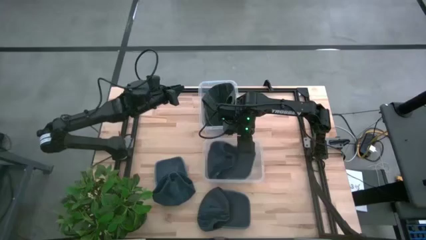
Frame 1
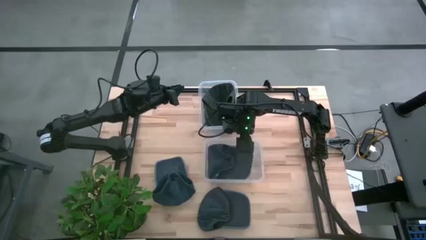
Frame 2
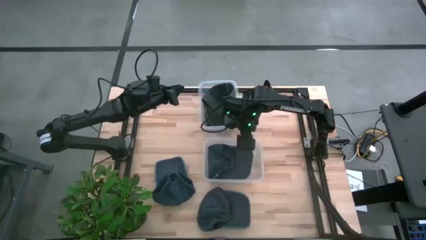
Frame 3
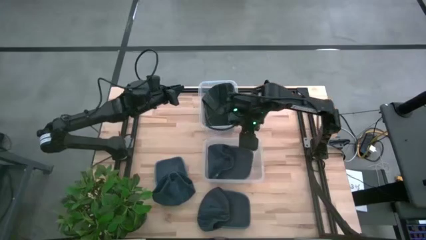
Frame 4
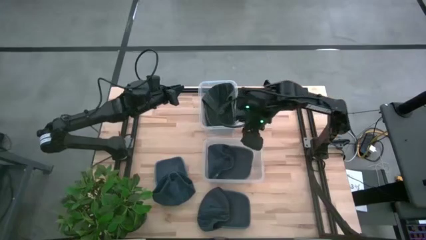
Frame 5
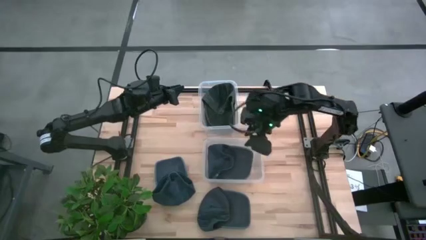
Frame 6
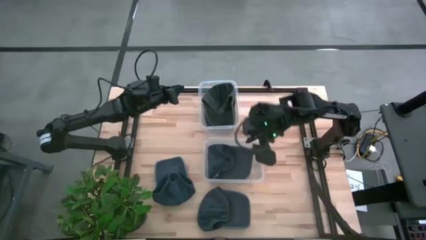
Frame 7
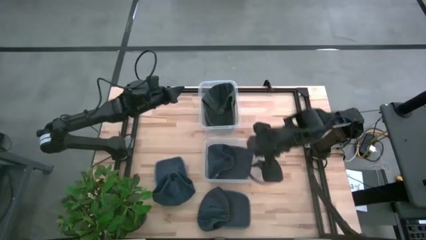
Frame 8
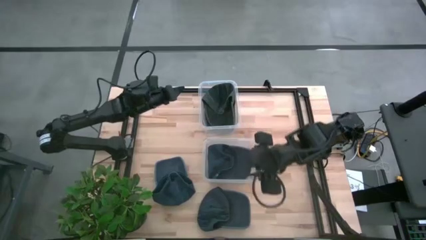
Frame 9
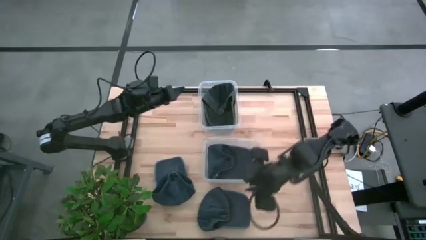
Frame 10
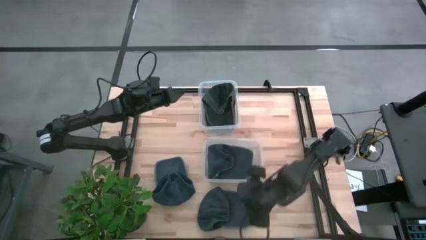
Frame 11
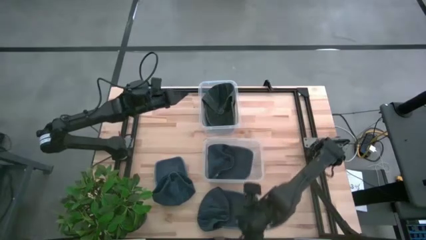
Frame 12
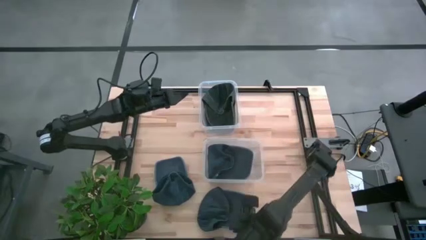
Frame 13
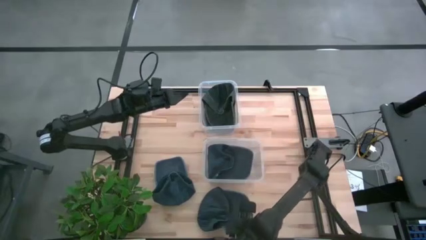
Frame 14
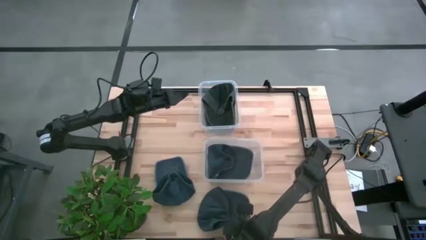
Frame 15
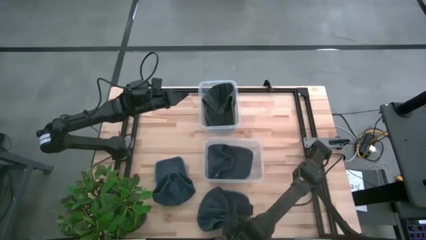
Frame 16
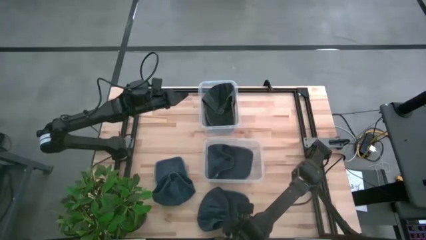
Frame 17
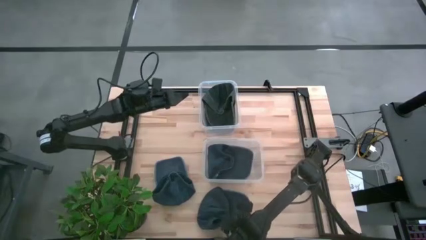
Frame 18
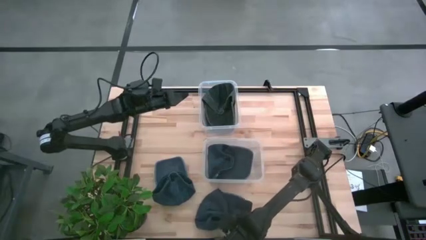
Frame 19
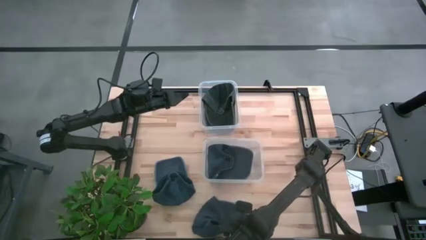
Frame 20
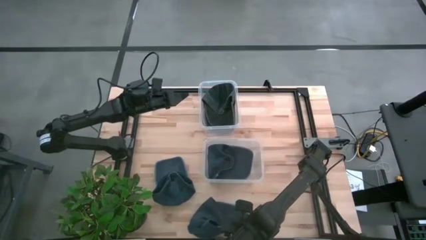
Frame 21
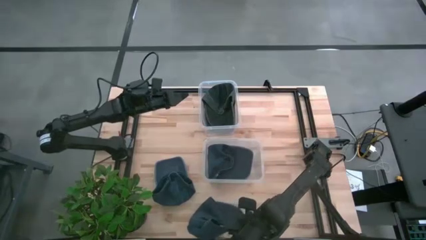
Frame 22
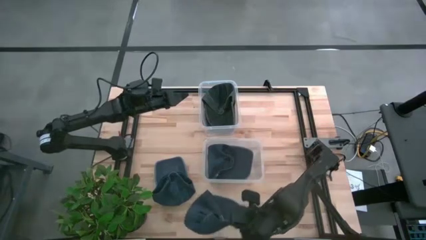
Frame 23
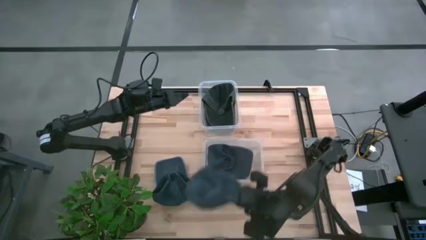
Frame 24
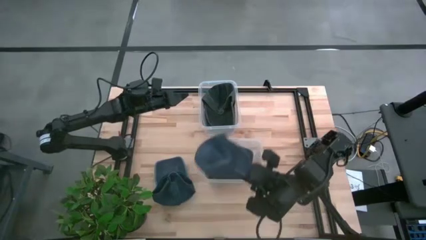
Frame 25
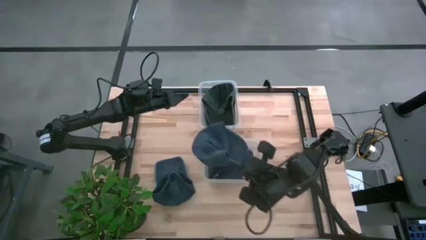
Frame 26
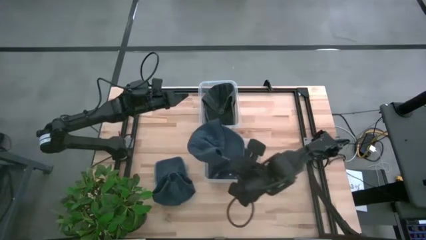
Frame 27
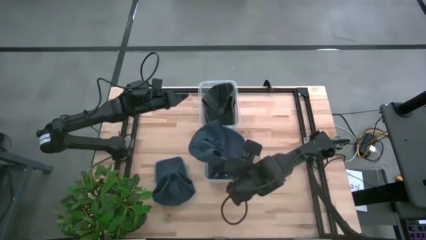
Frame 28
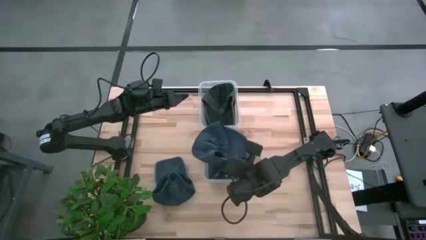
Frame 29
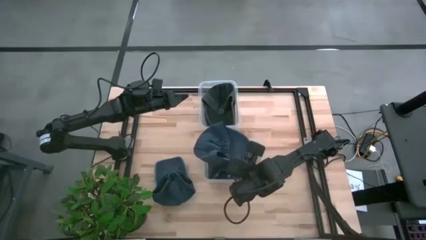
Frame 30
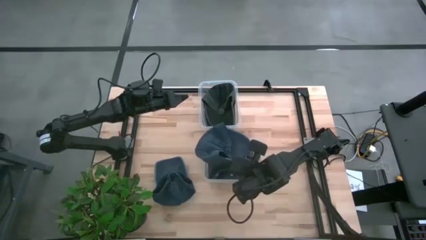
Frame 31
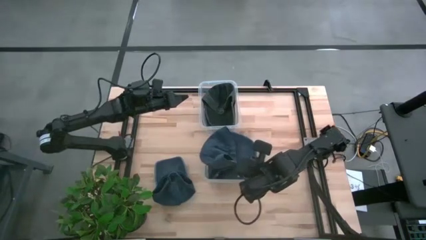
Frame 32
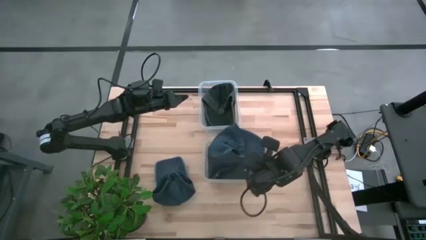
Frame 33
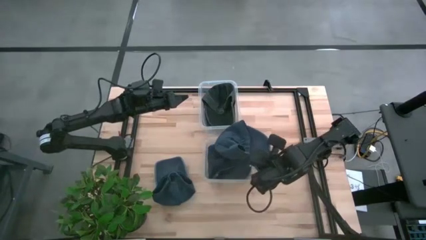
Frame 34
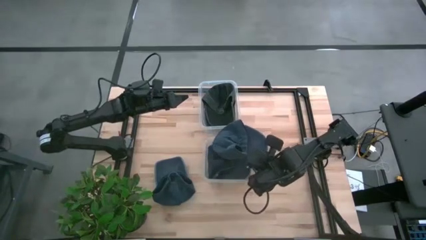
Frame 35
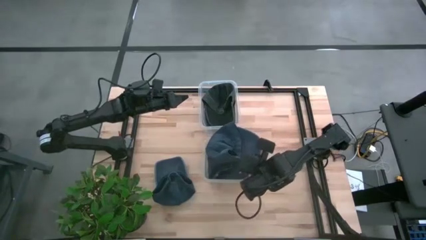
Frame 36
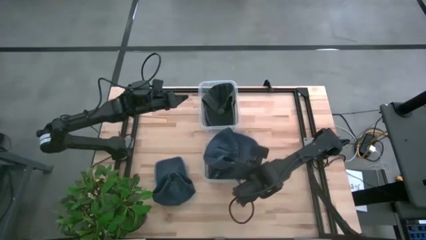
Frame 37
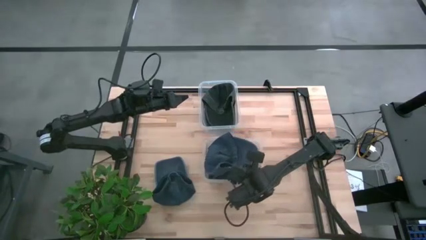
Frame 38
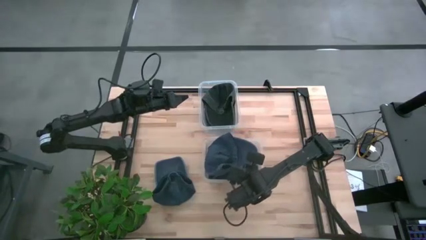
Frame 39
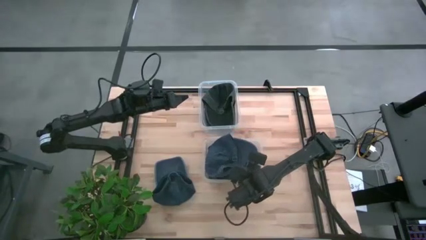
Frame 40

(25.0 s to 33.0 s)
Task: Pick & Place hat
Put the bottom blue cap into the bottom transparent bin

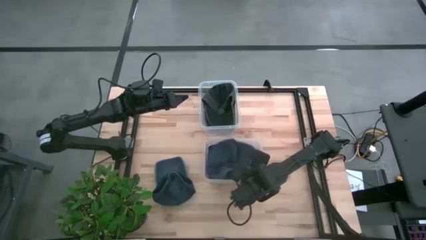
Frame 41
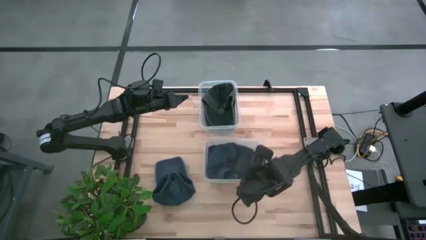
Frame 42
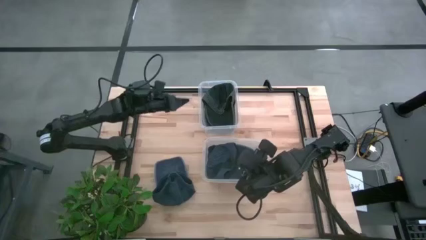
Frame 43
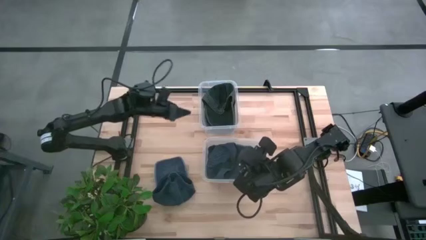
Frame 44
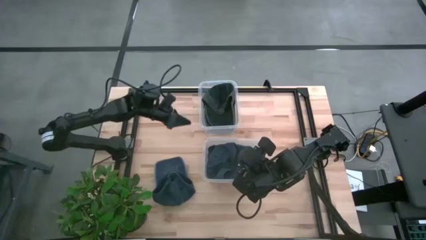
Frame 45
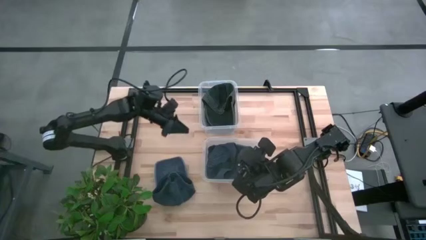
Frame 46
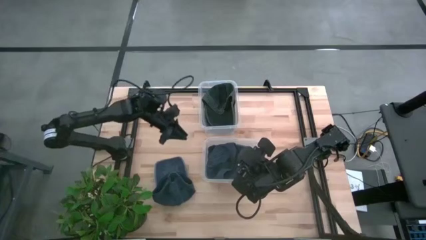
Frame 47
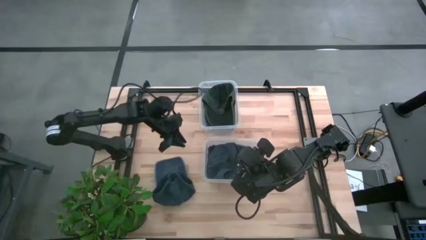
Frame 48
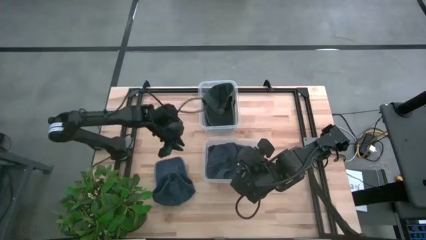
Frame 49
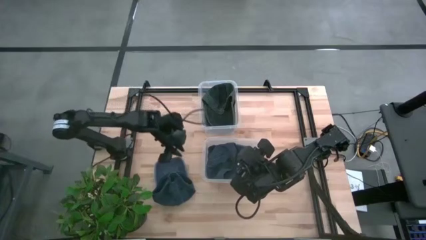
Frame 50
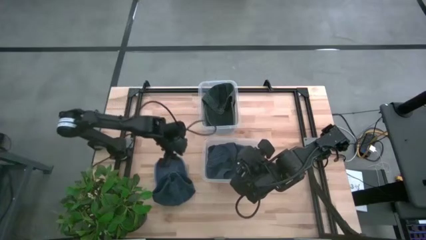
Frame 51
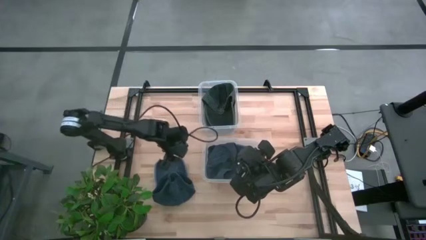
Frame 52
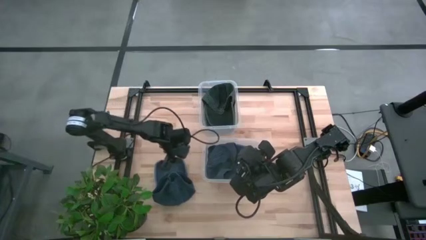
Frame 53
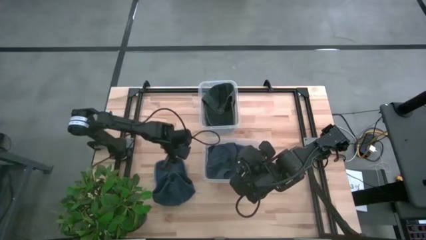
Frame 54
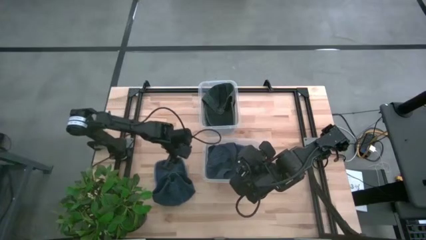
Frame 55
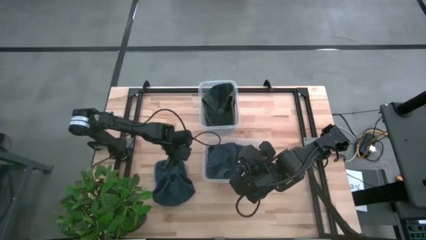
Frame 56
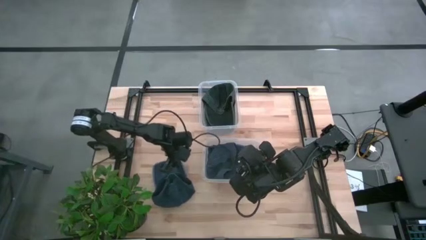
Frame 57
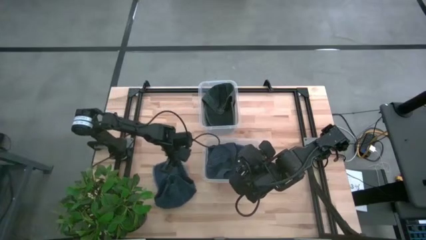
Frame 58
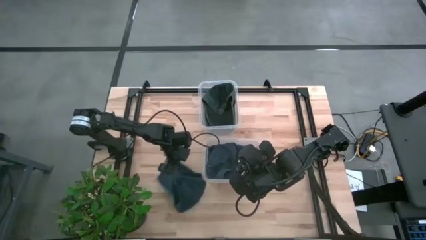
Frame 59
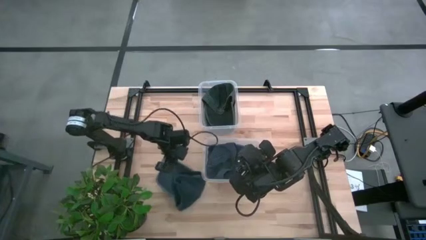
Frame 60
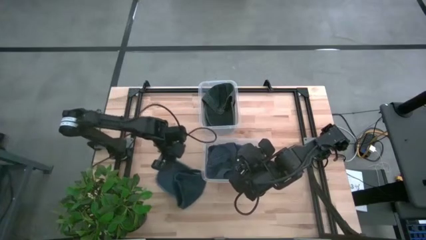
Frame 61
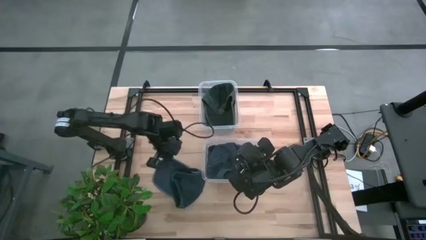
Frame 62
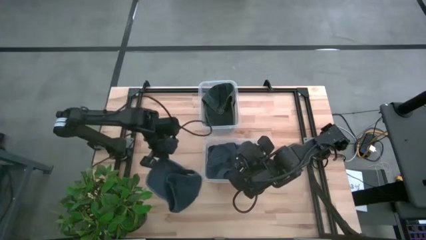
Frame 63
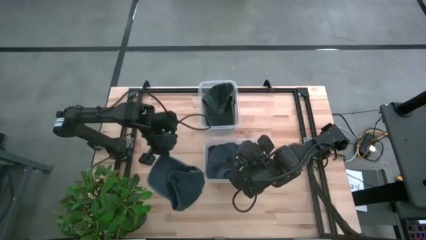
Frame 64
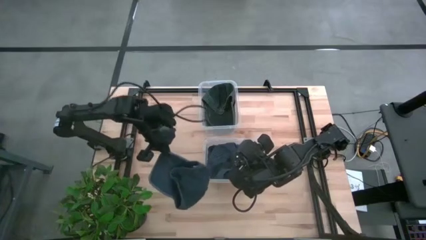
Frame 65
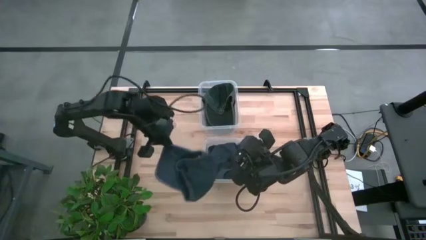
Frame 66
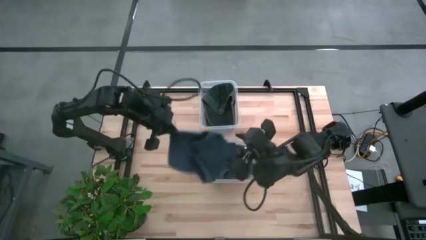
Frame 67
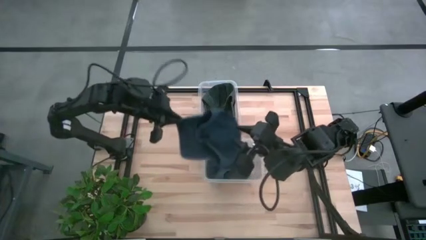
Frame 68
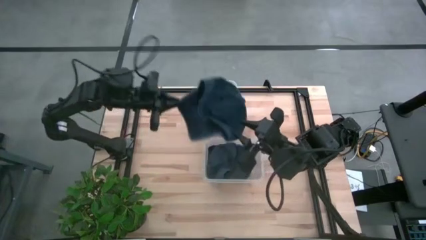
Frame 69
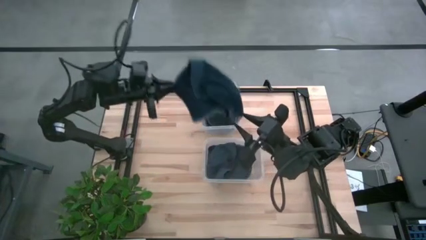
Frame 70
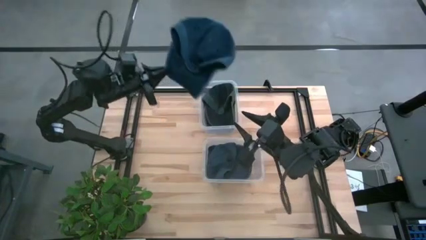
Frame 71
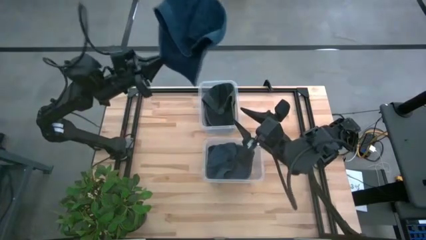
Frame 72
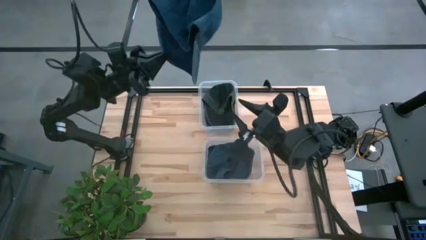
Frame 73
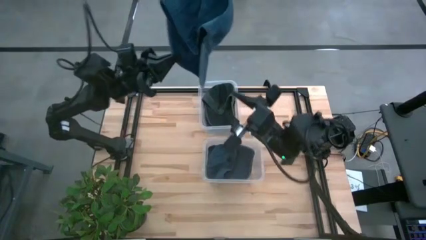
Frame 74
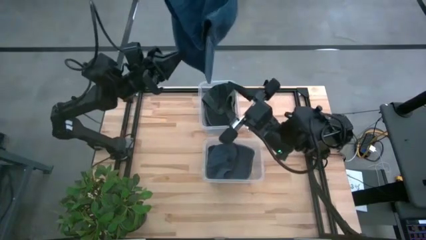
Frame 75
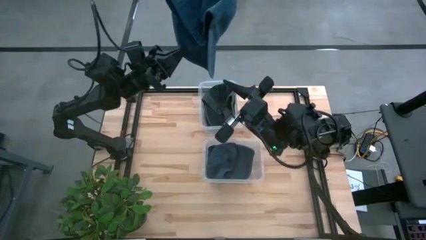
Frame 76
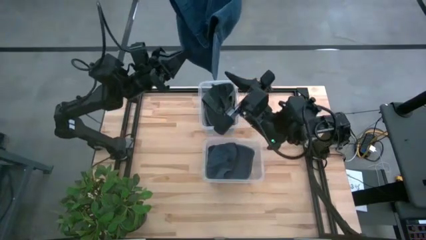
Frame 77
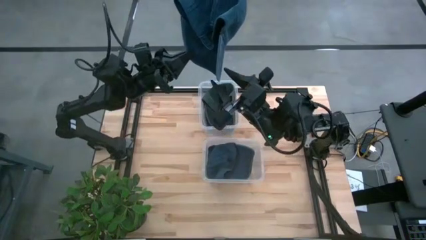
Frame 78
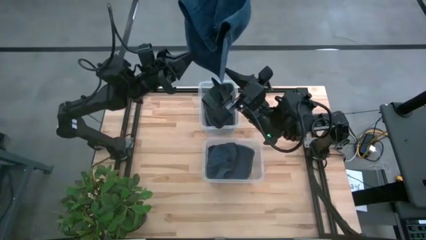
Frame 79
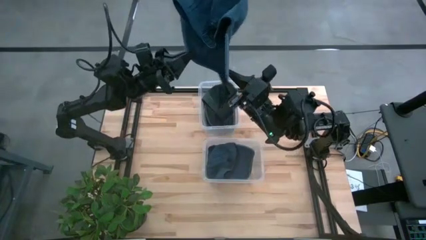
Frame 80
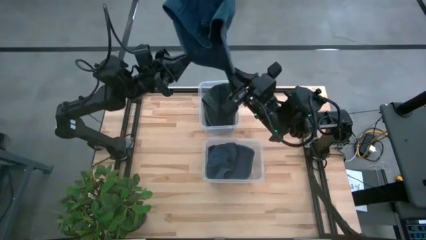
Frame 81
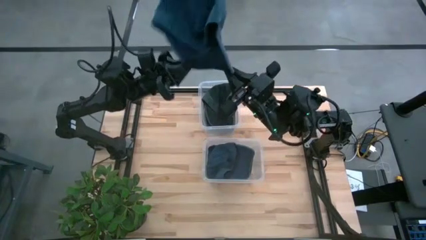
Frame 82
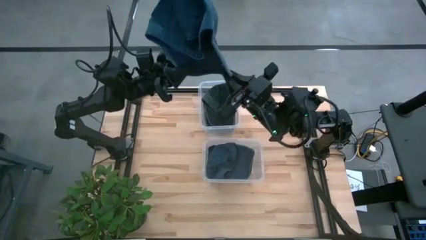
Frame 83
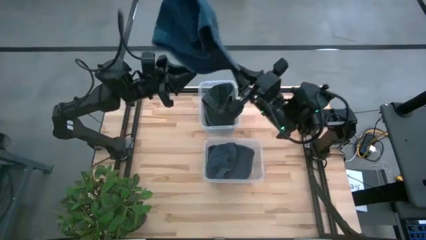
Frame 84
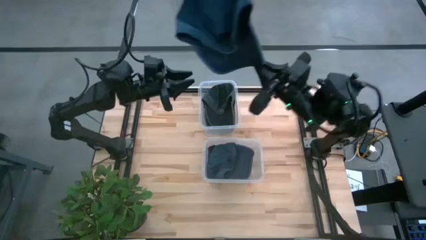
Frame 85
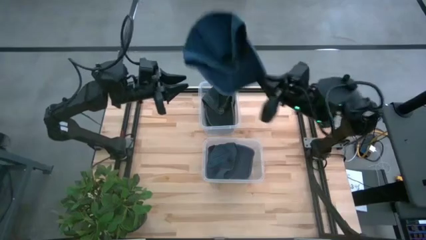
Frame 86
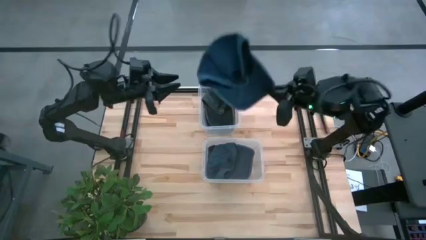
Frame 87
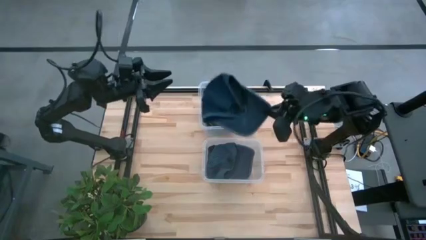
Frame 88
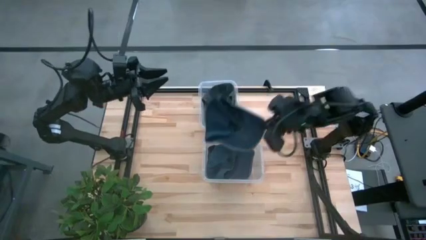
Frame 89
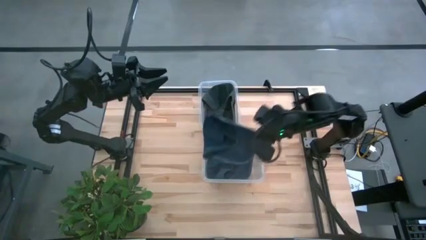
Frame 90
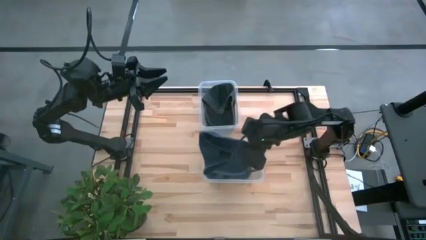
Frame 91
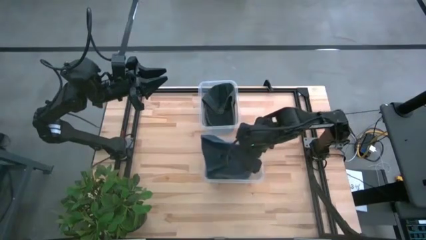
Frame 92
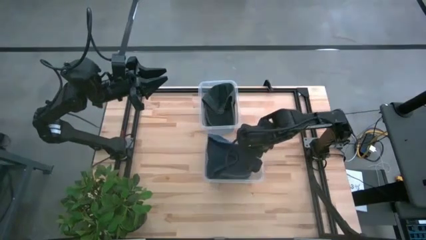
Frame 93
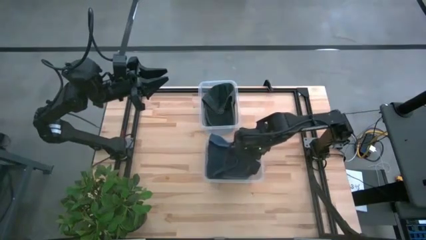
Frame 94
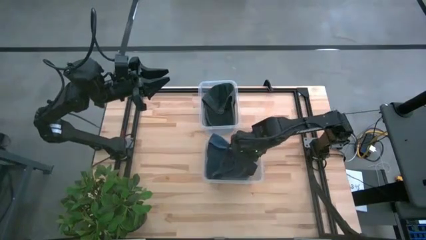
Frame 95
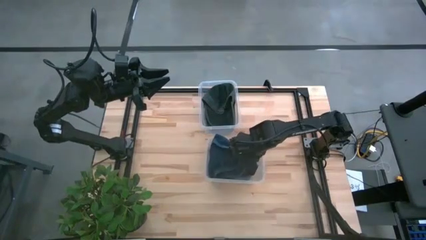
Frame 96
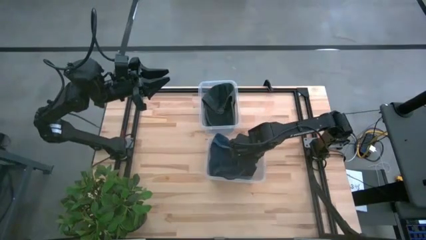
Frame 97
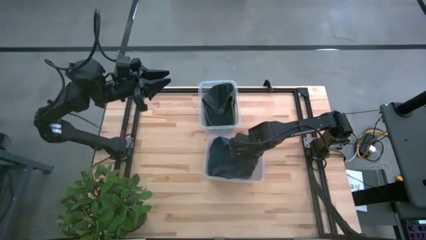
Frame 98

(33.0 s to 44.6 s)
Put the blue cap into the bottom transparent bin
